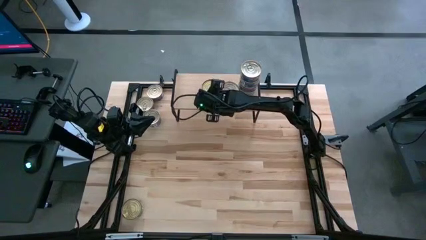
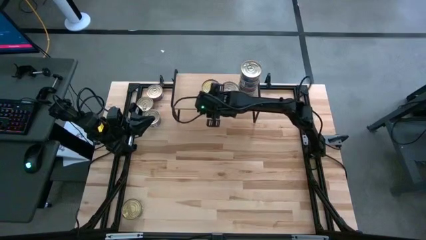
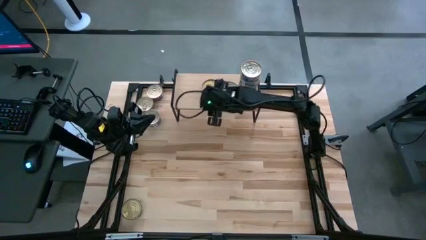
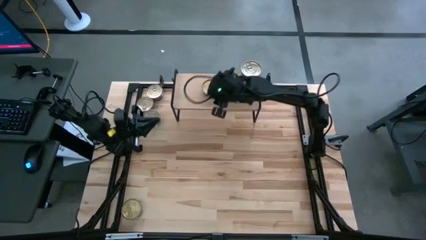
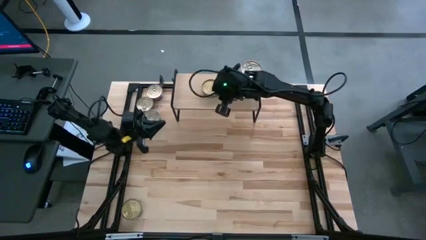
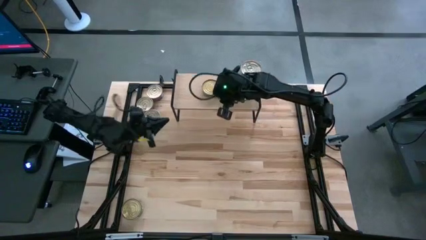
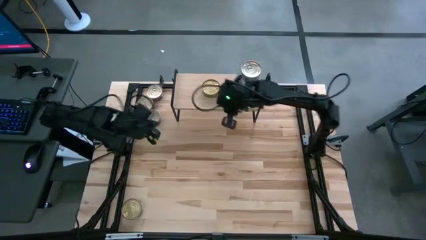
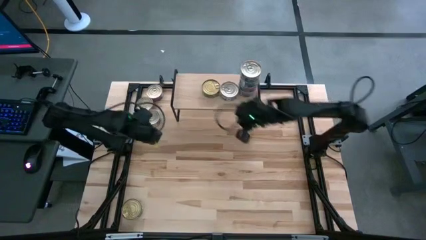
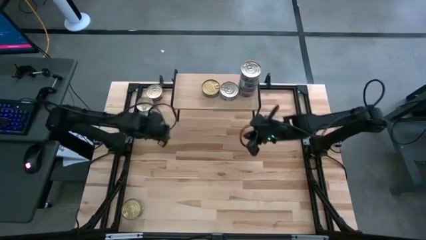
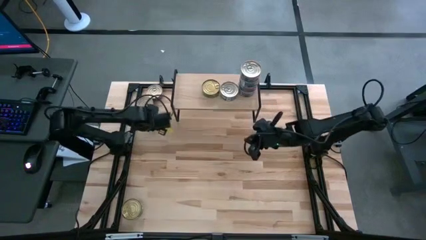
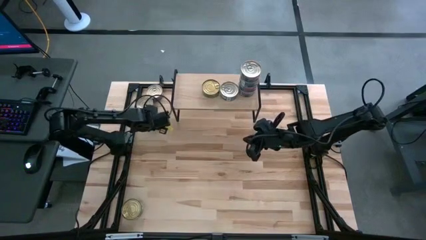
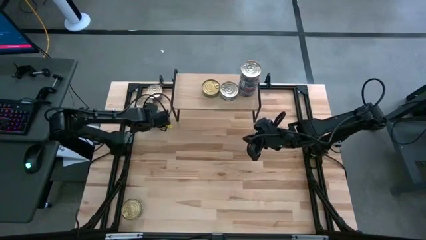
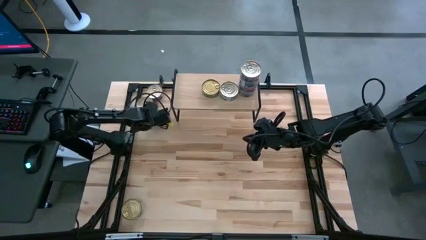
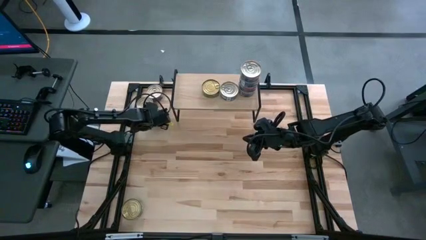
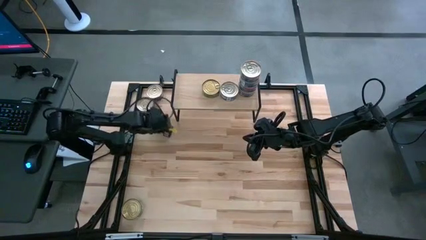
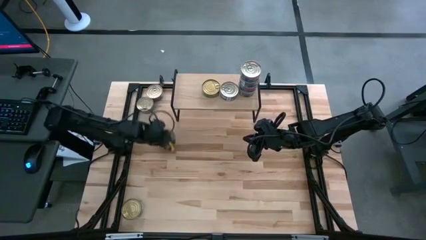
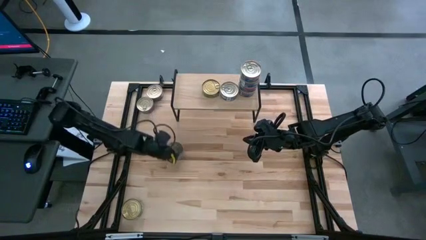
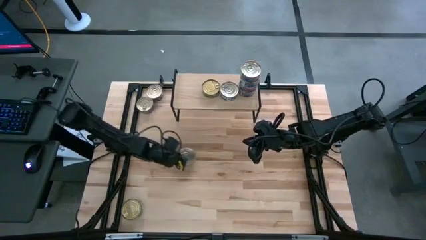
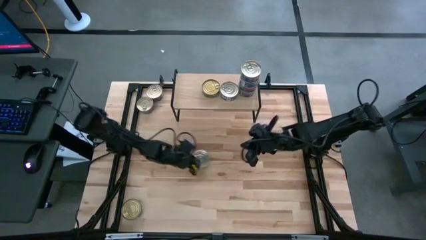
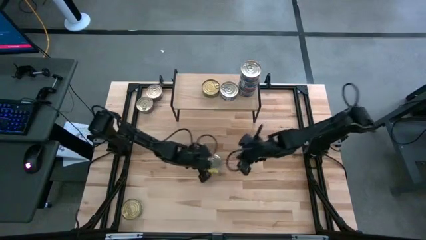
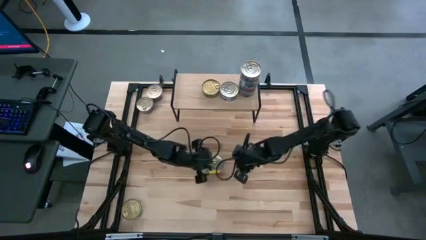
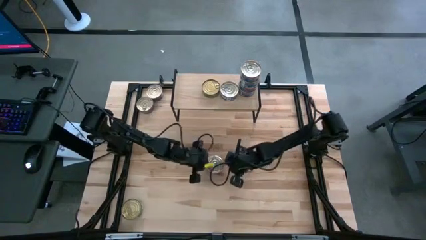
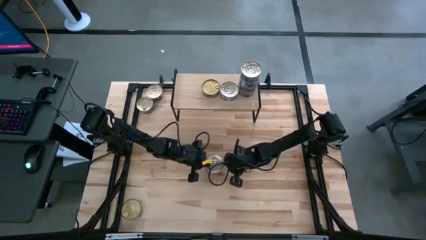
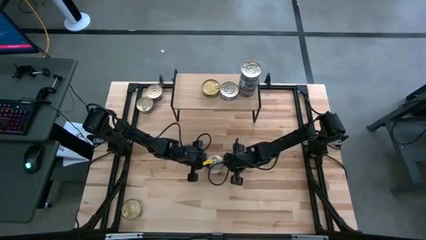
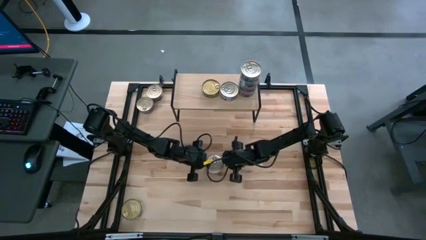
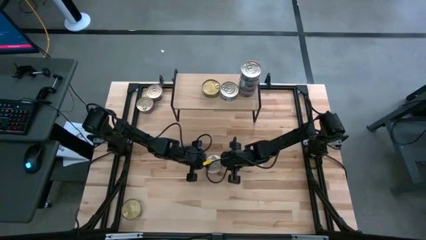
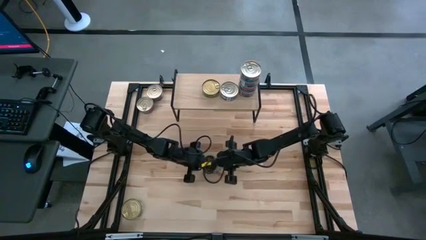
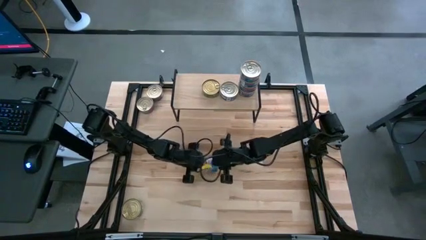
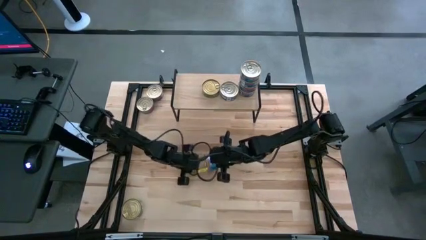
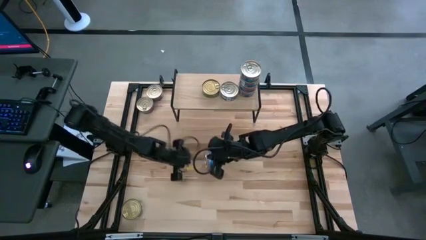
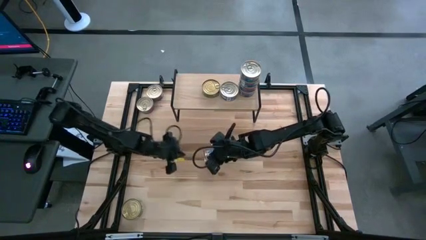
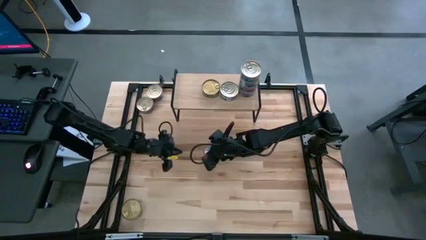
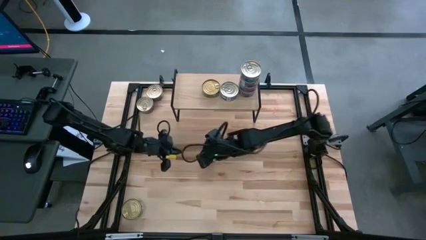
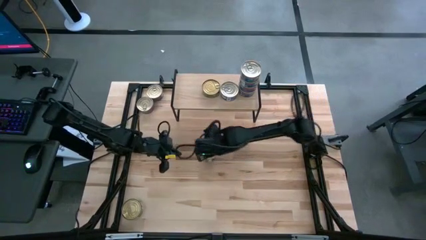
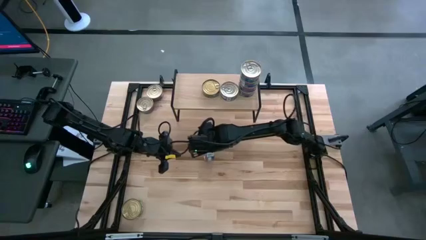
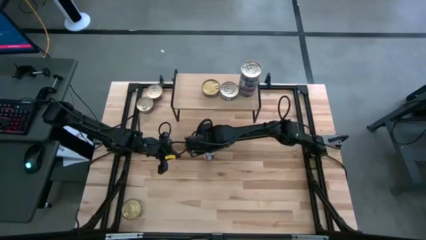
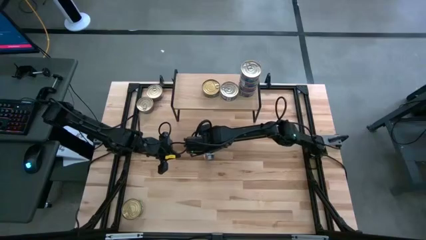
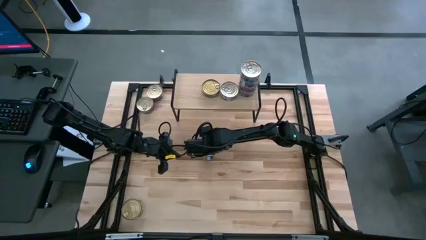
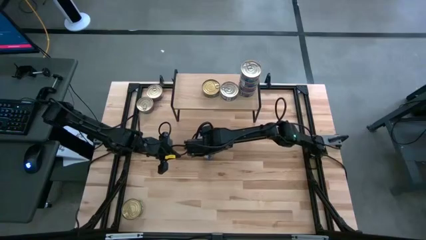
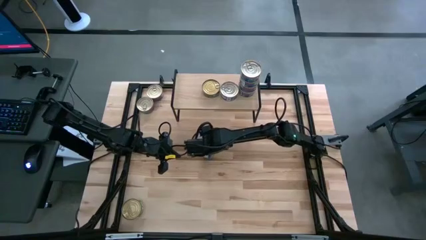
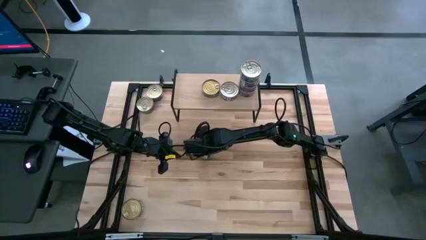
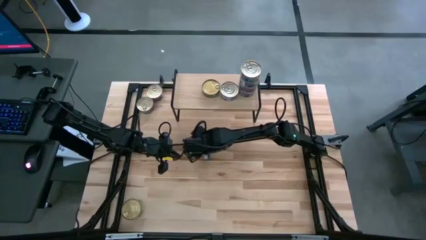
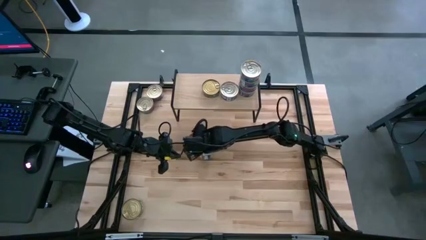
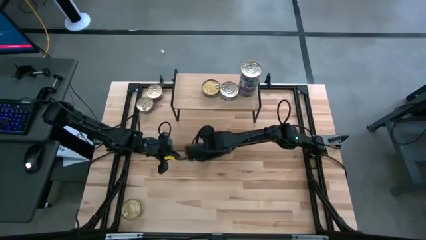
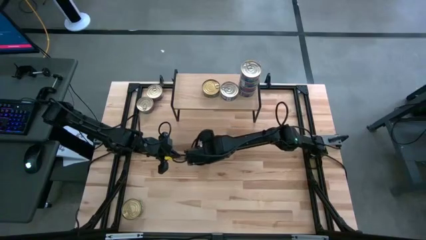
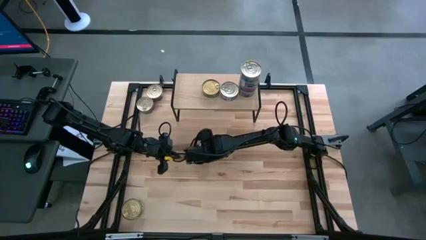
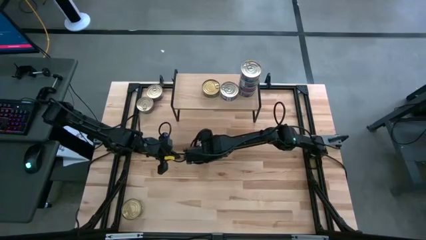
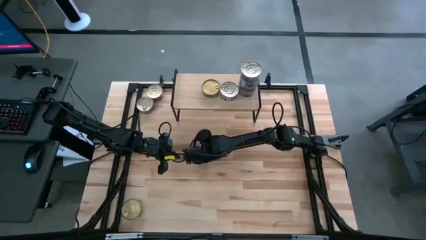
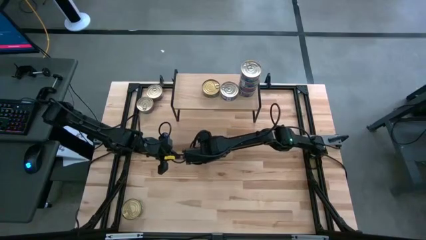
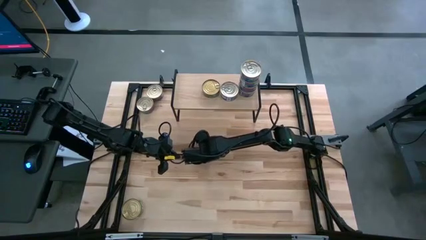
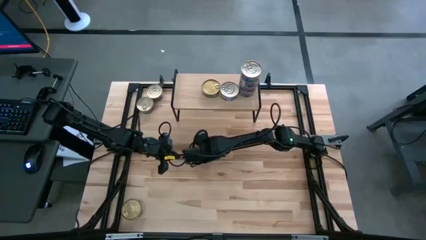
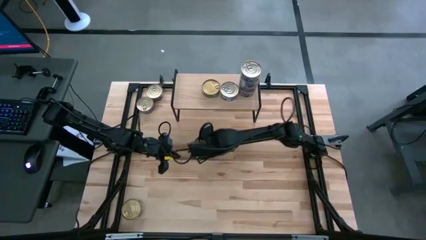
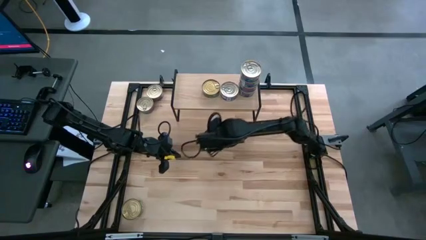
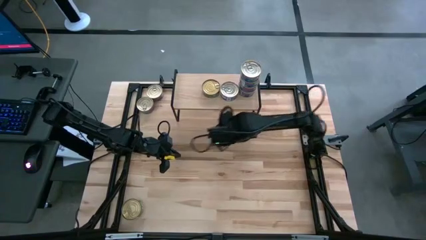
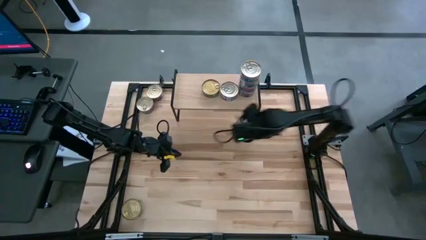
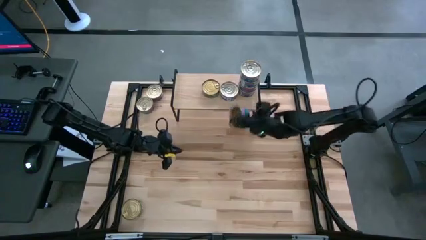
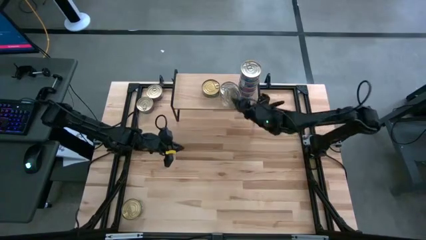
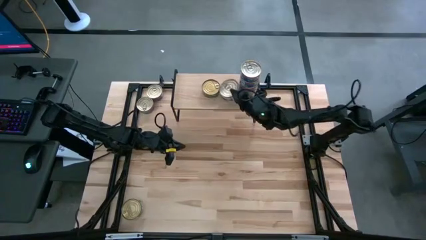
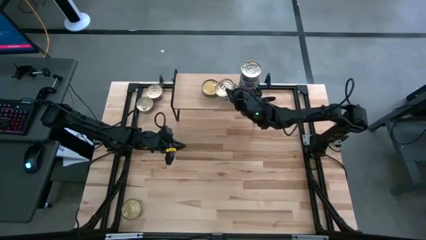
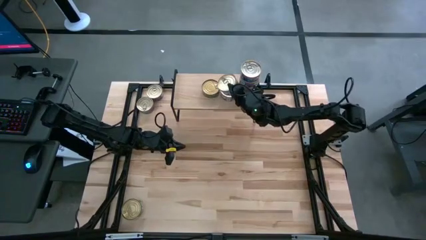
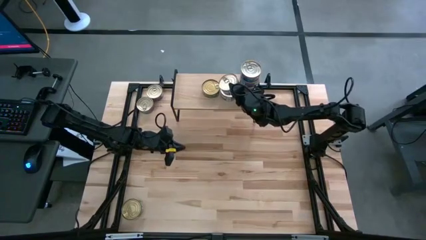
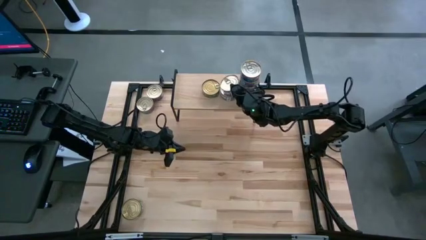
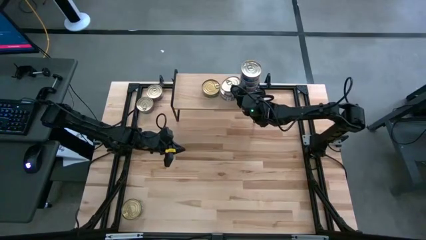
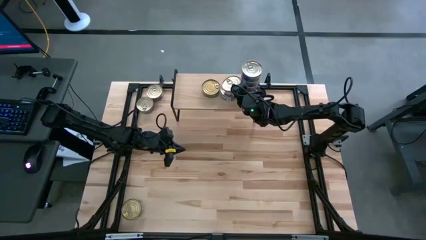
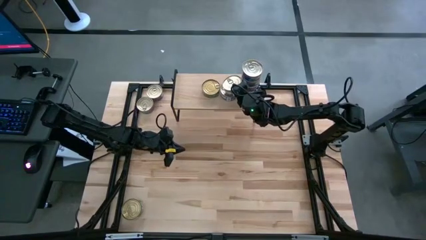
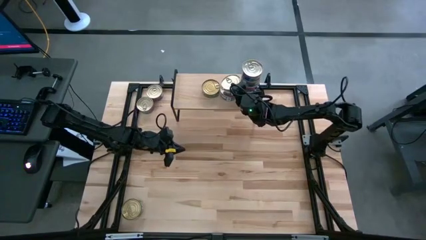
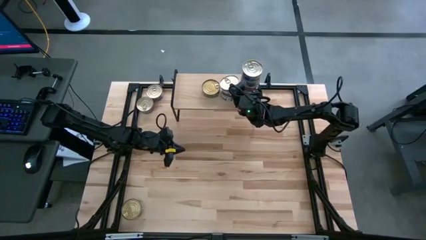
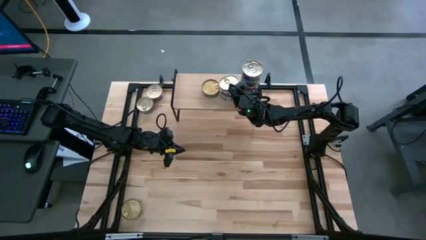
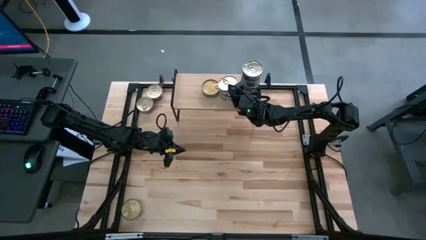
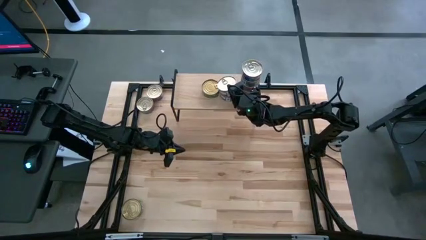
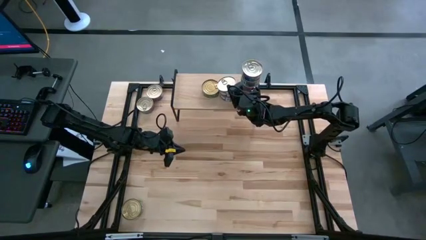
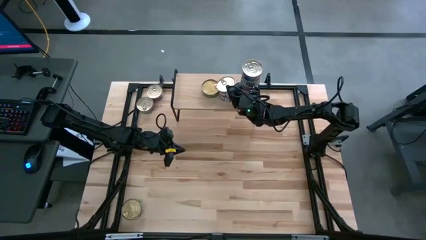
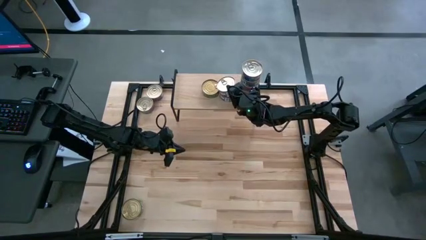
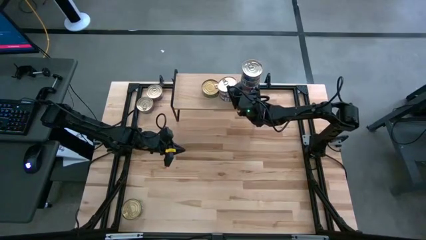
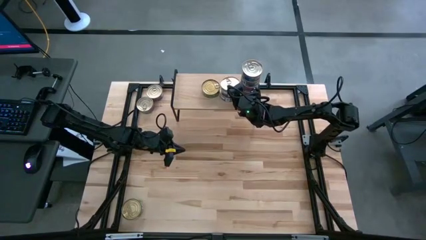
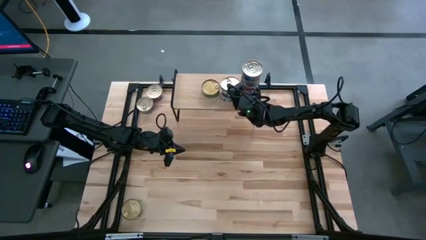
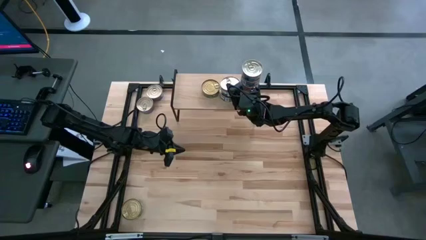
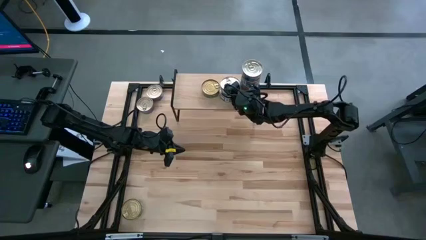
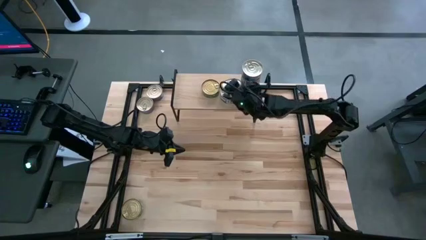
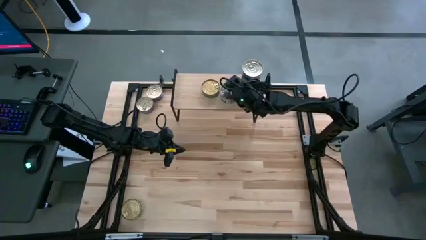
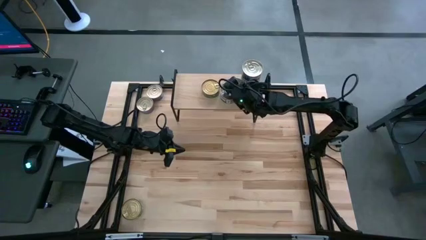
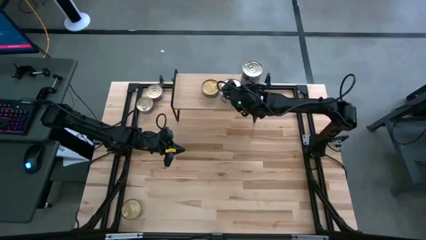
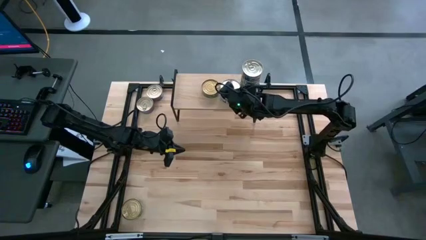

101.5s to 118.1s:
Task: Stack canned seafood by type on shelf
Stack the blue tuna can on top of the other blue tuna can on the shelf
